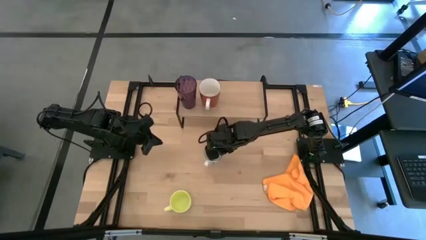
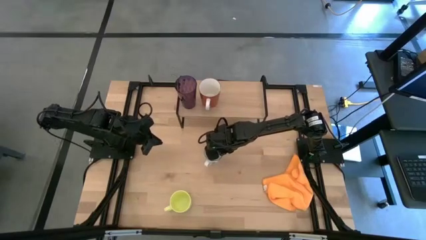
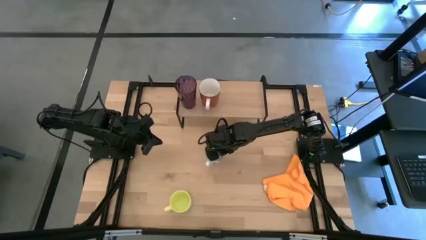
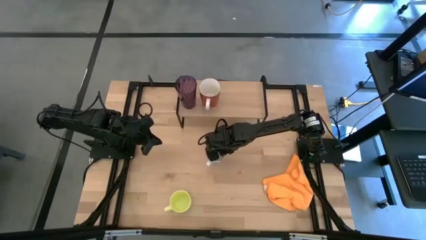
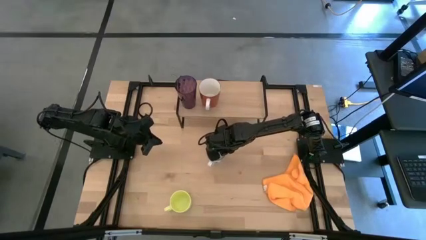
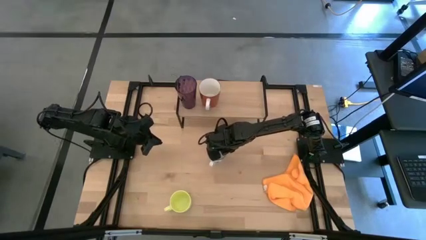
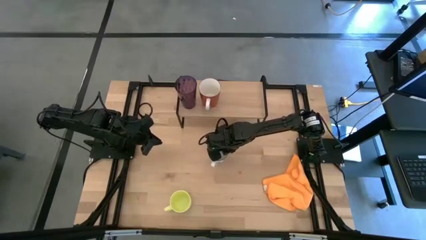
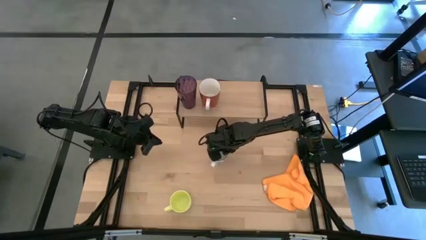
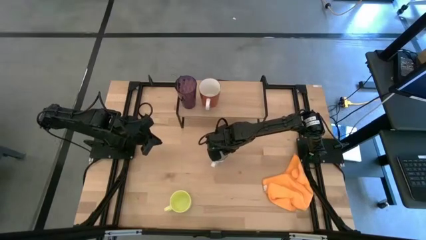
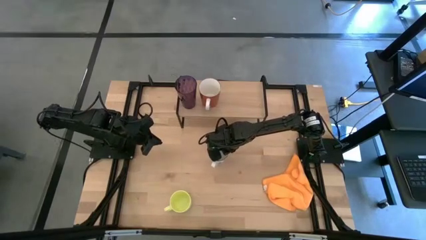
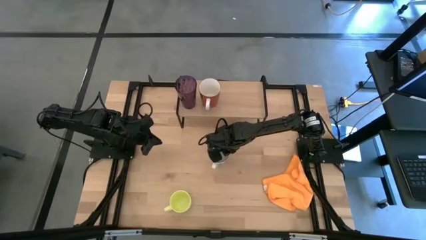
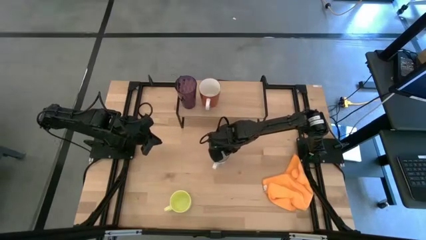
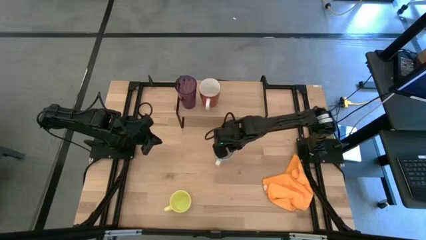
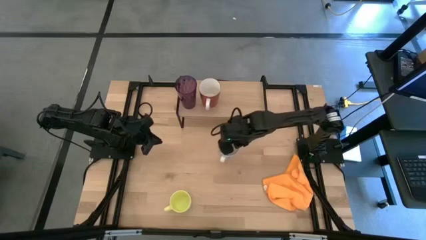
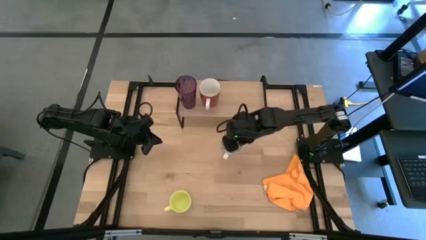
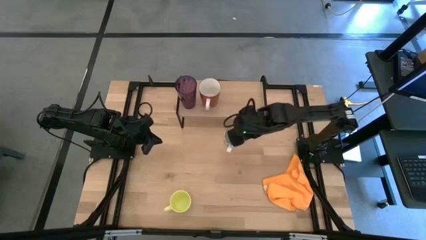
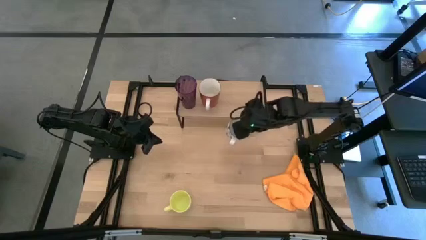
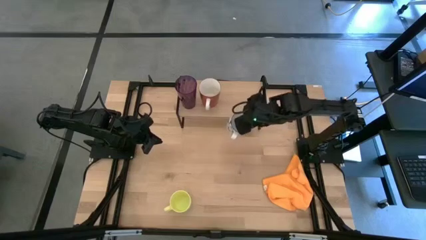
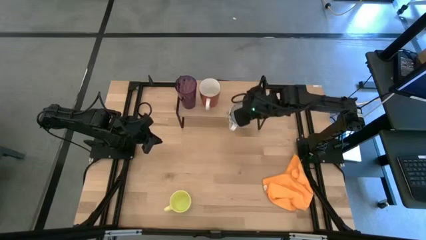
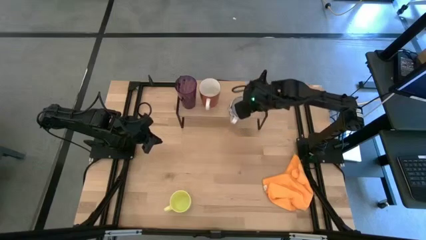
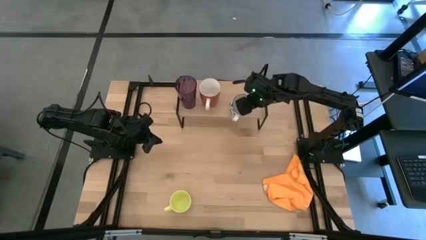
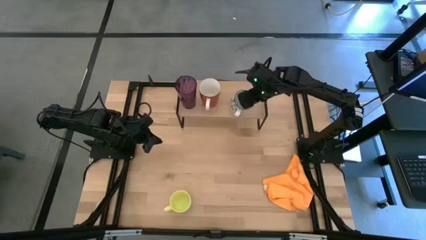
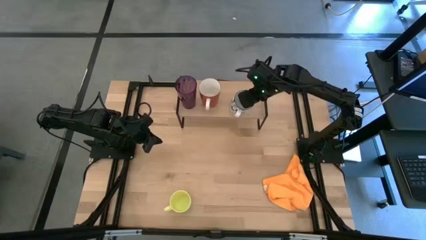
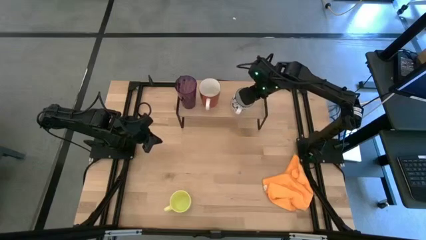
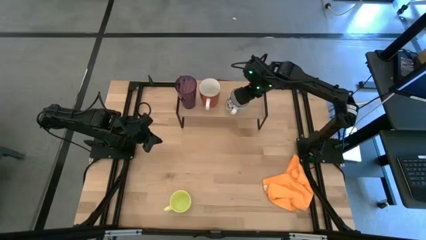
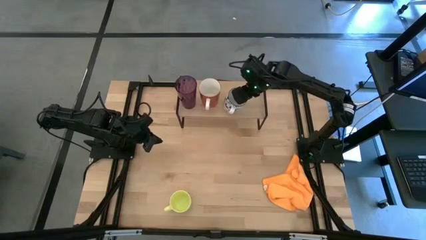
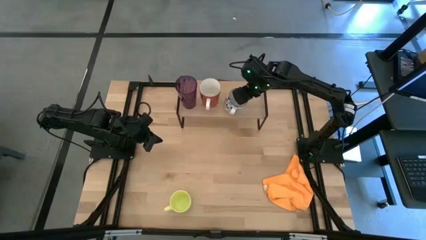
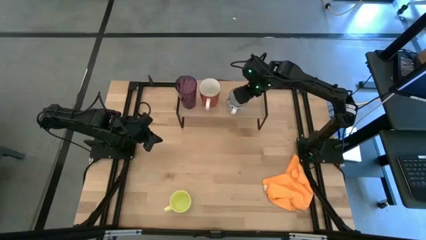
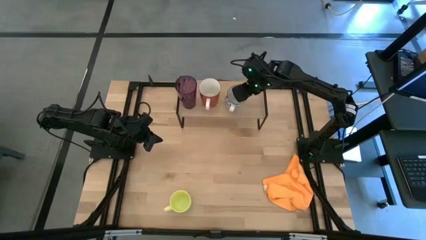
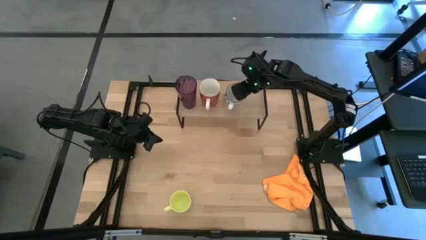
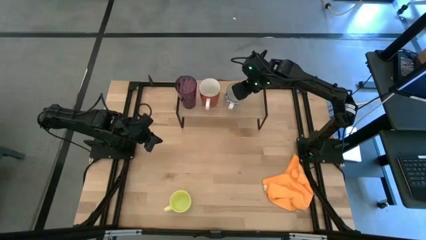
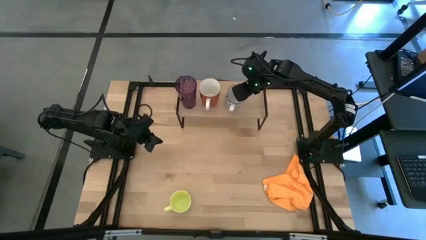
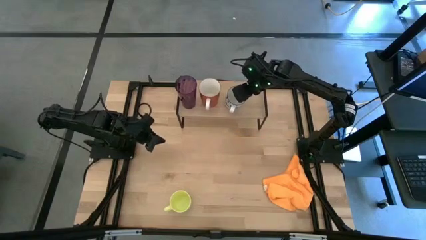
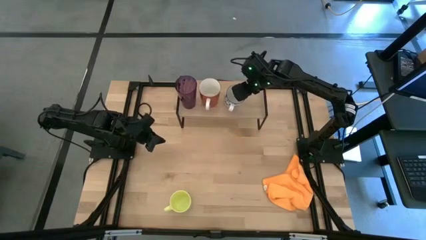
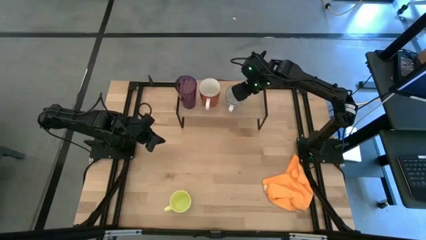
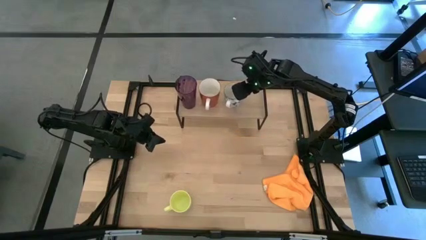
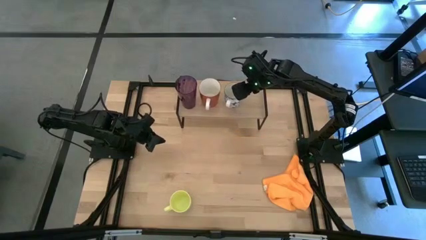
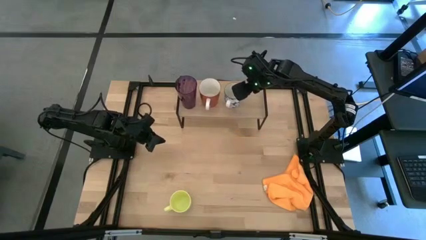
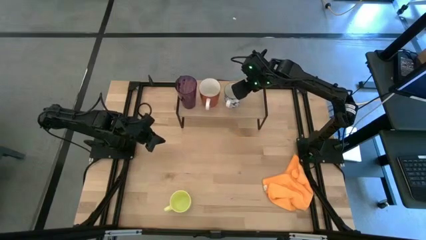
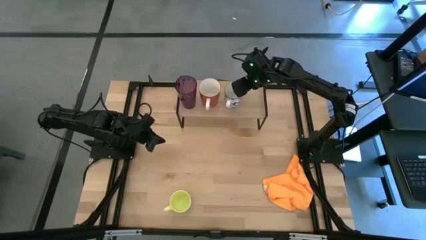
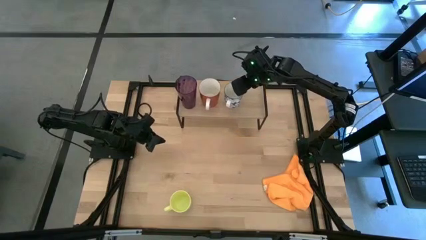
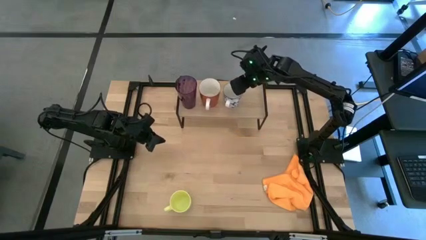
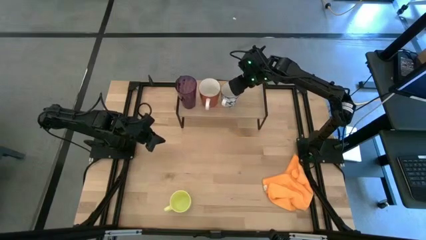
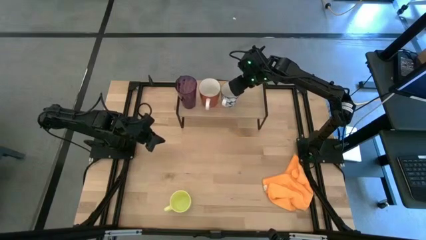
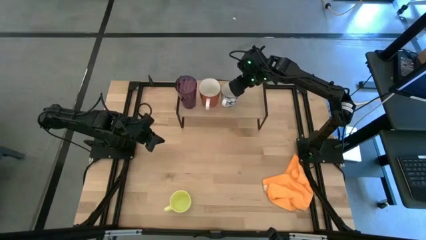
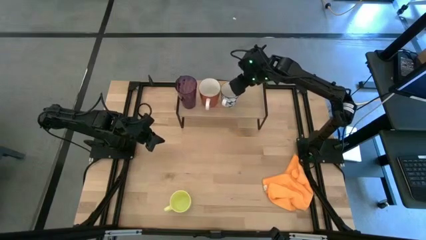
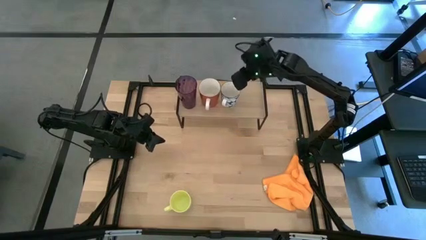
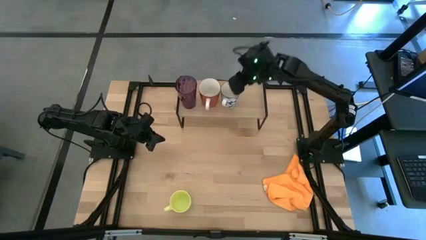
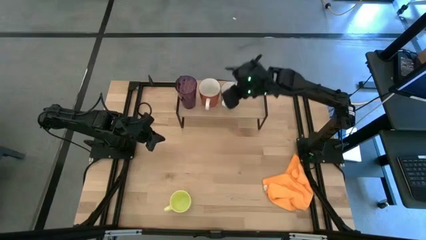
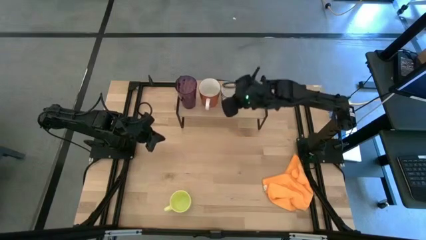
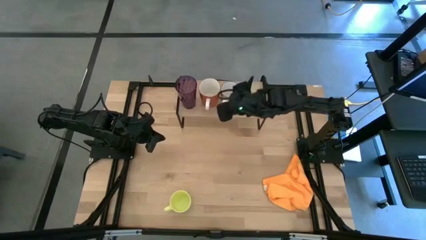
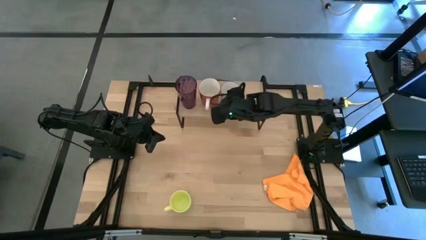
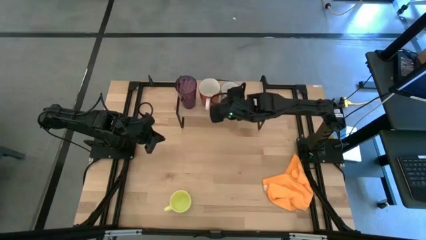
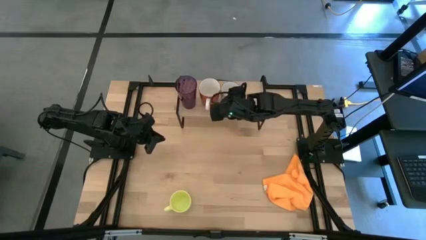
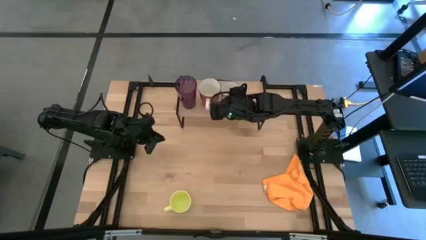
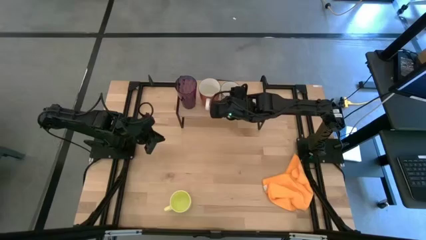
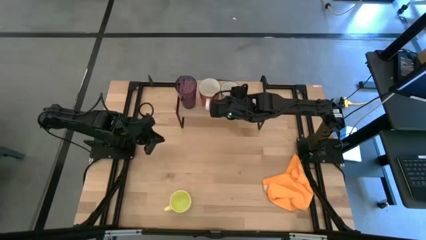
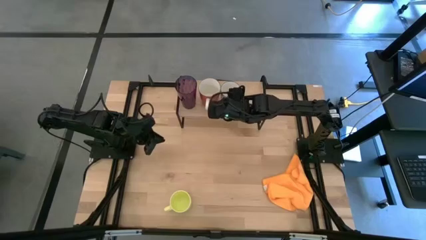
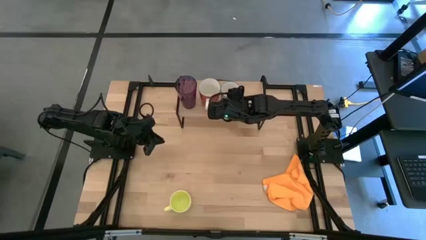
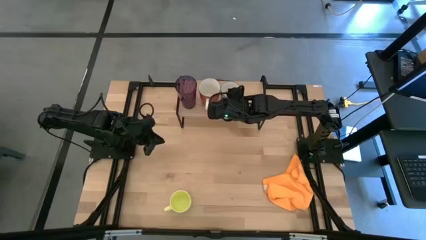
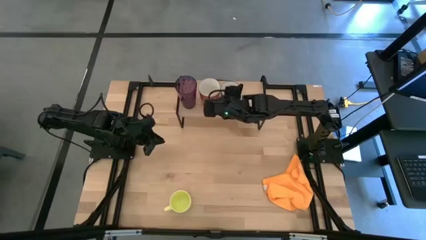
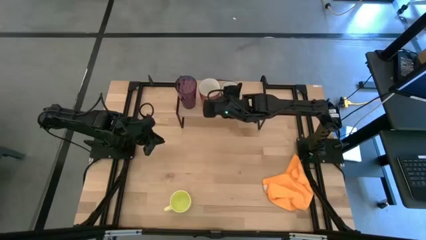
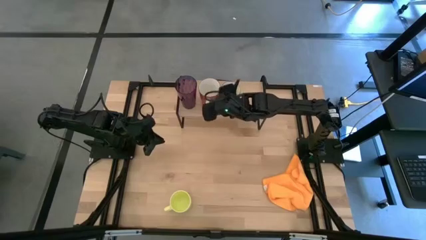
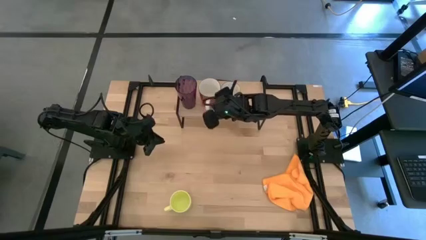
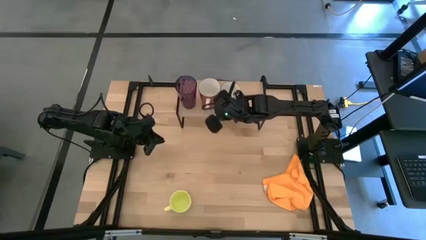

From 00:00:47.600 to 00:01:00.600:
Task: Stack small to large cups/mugs on shelf
Put the blue mug on the shelf
